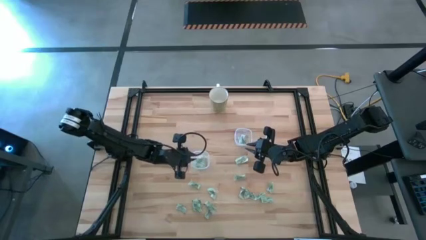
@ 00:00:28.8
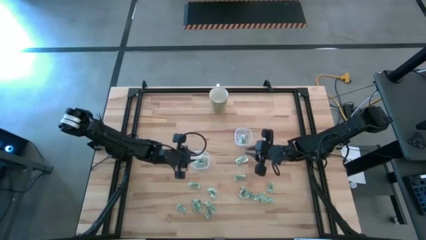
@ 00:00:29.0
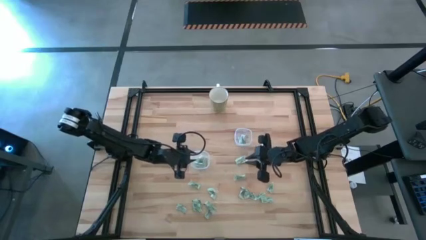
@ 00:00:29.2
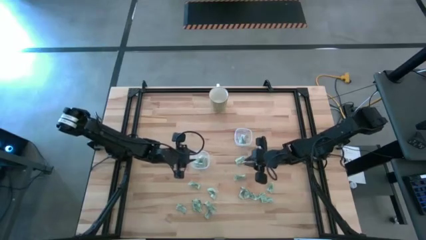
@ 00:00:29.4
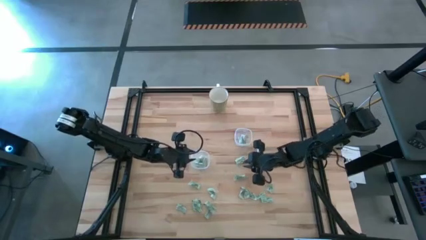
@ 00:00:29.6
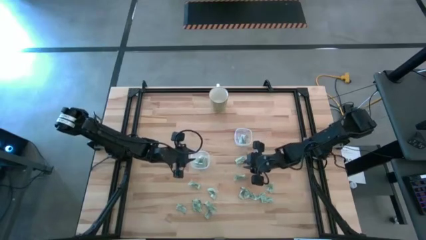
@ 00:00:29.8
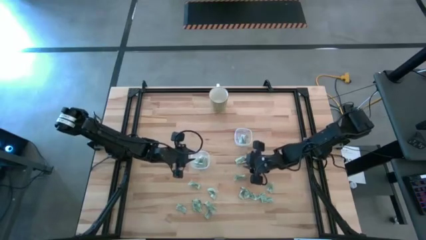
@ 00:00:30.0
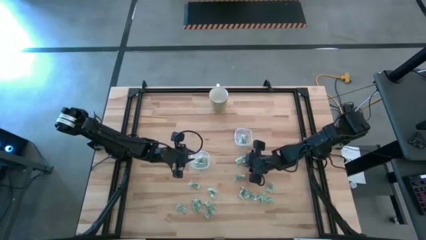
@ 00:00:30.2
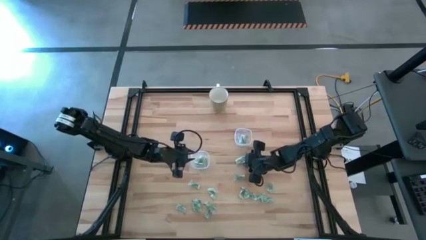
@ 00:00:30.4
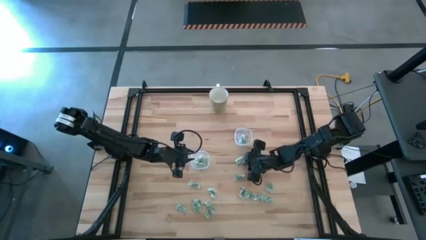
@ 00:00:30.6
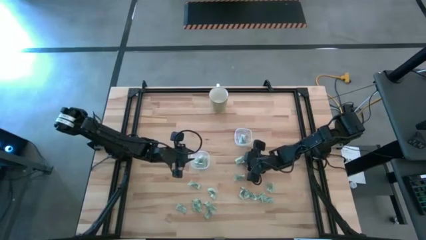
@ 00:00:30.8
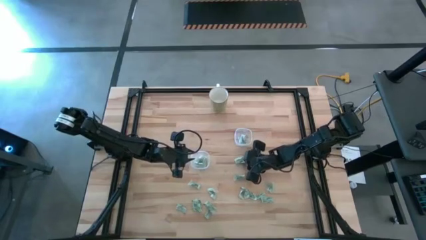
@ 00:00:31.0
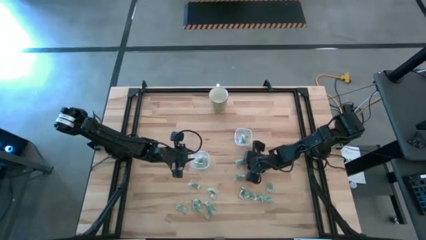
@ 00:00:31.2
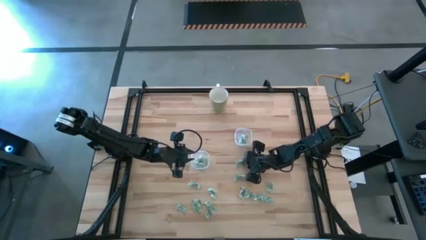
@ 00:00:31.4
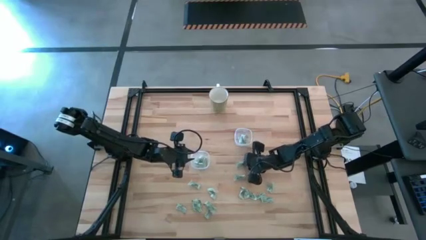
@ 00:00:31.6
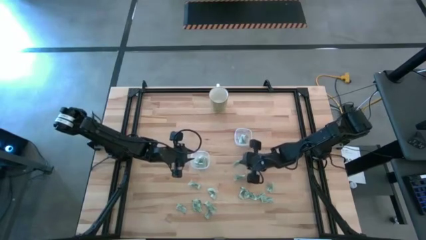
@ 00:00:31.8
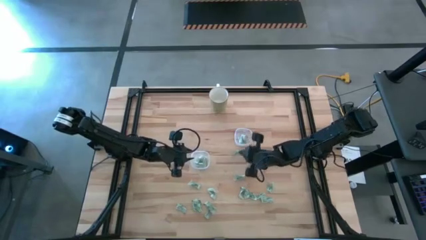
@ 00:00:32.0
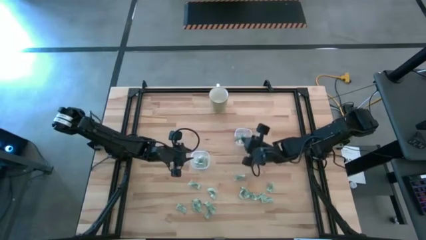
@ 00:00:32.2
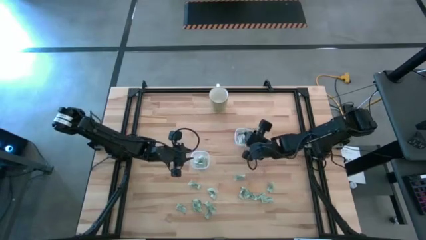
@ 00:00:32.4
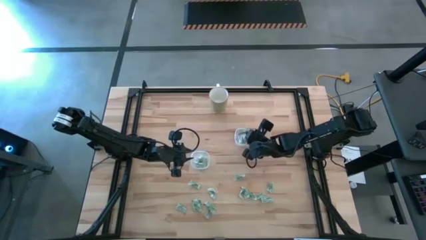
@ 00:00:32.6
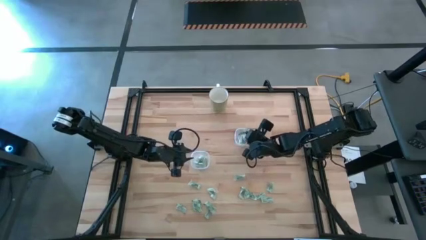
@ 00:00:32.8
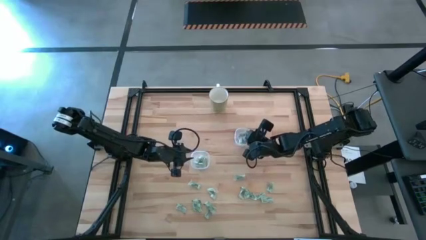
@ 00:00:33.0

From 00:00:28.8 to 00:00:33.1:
Task: Pick and place Stevia / Truvia into bins
Put the green stevia packet into the right transparent container

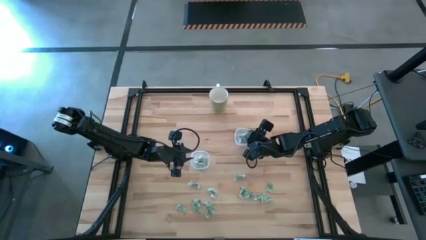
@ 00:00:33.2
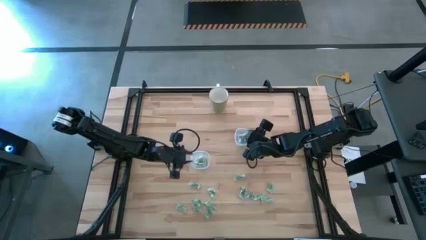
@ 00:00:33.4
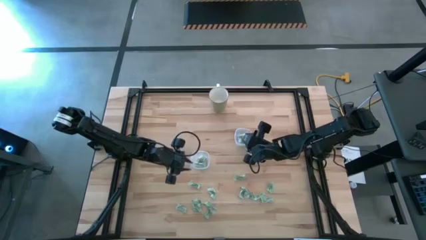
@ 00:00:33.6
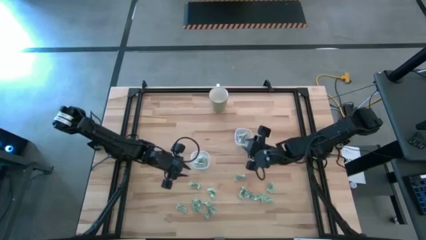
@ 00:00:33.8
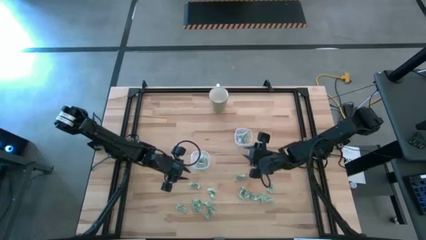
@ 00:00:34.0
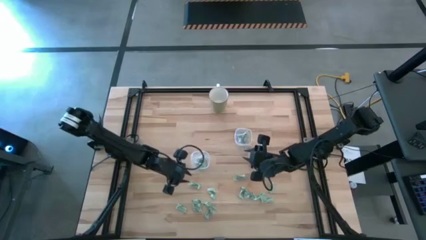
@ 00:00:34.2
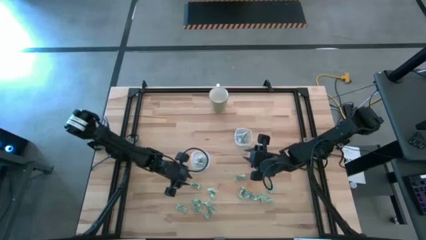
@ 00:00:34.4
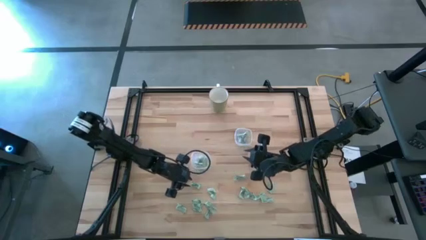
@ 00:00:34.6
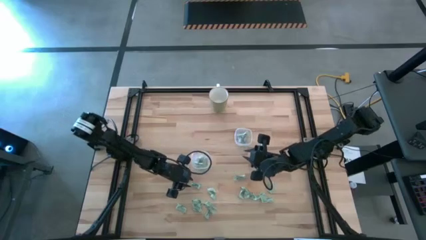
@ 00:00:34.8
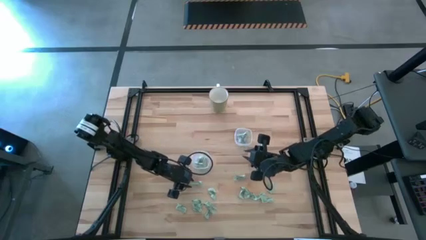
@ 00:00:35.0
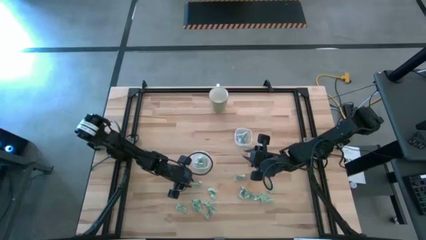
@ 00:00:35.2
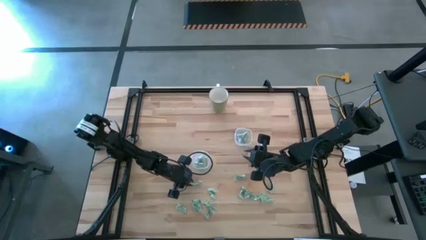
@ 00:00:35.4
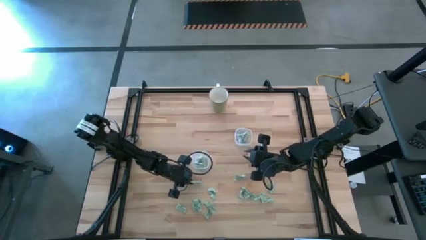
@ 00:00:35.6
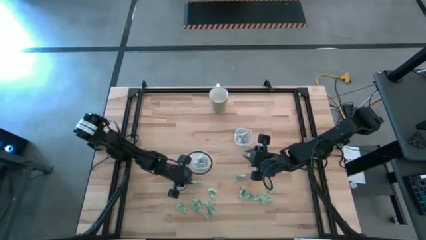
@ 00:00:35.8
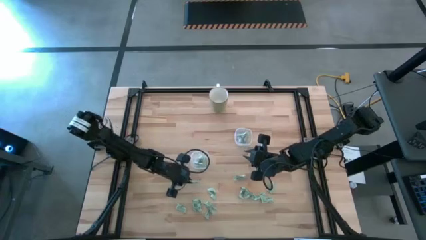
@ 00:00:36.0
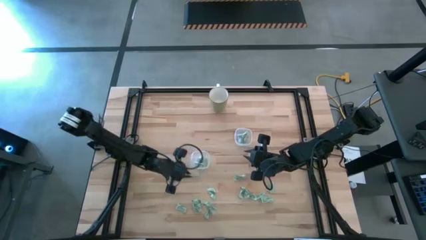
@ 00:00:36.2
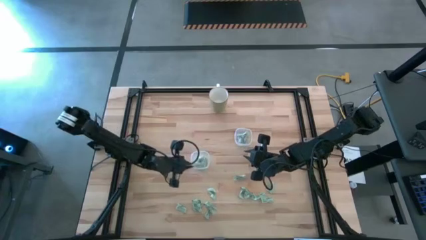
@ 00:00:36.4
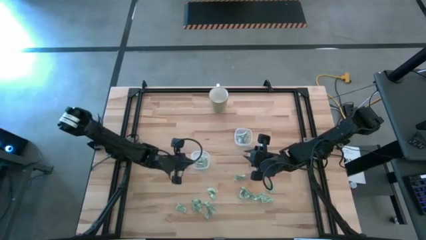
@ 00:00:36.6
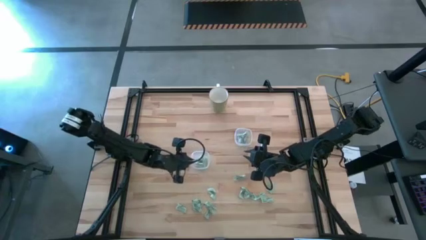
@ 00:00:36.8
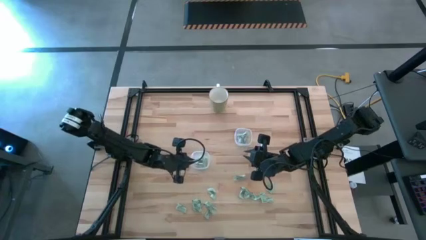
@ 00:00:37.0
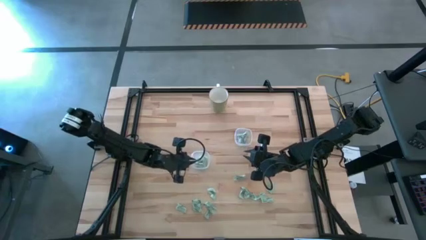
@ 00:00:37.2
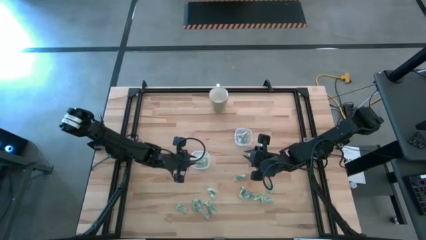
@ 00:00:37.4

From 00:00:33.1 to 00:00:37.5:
Put the green stevia packet into the left transparent container

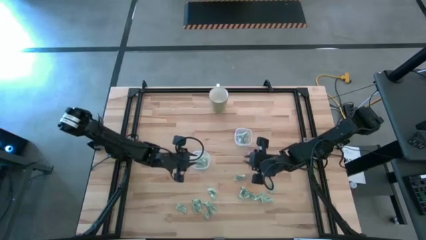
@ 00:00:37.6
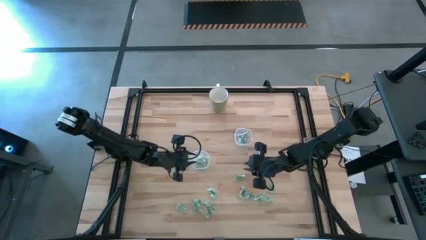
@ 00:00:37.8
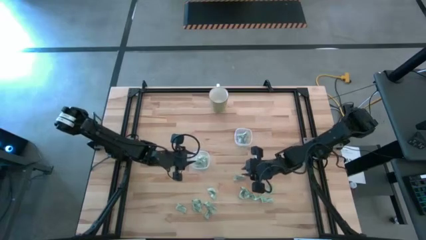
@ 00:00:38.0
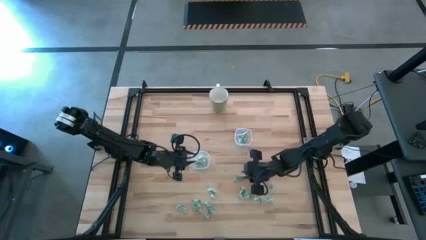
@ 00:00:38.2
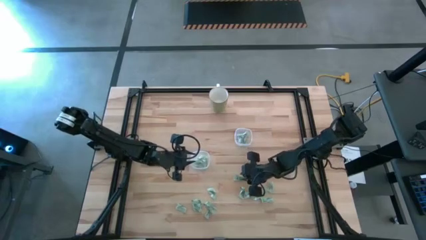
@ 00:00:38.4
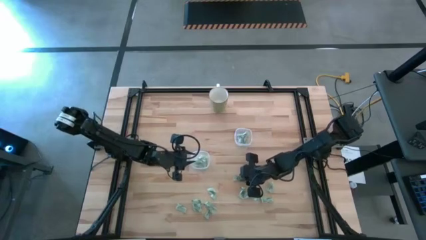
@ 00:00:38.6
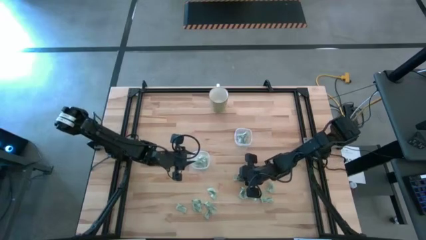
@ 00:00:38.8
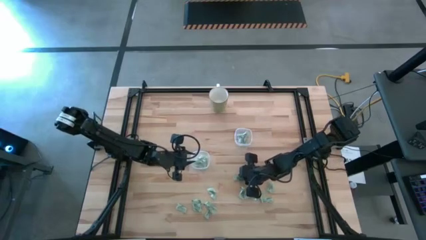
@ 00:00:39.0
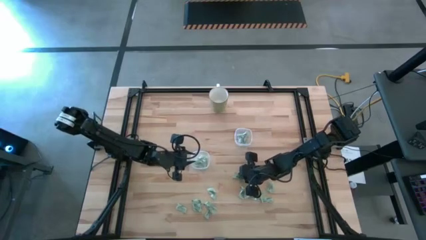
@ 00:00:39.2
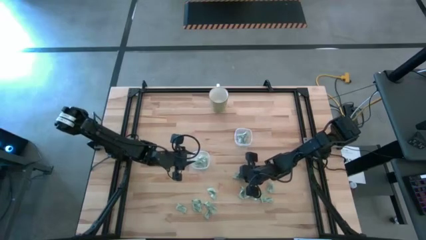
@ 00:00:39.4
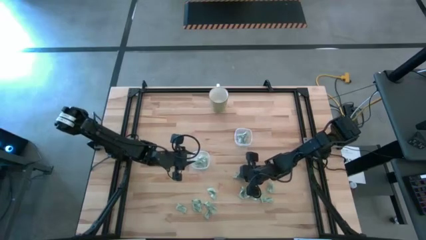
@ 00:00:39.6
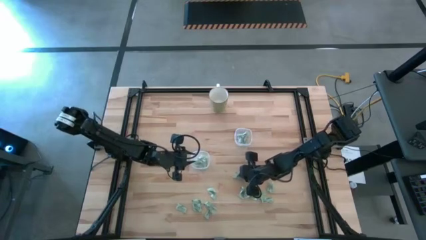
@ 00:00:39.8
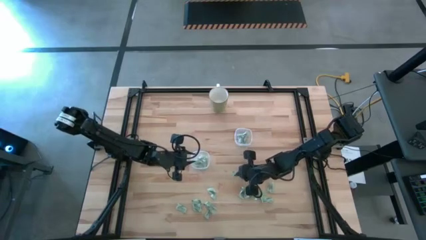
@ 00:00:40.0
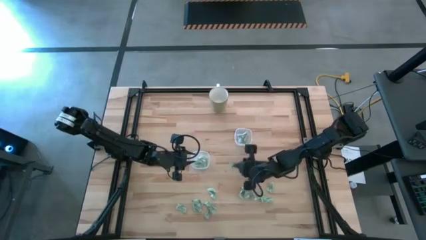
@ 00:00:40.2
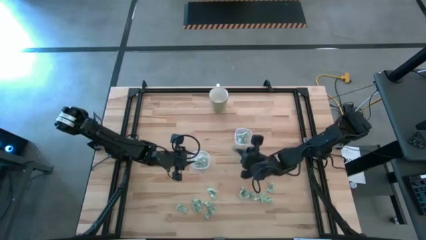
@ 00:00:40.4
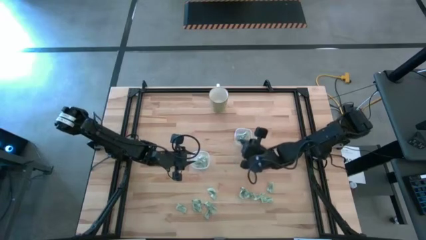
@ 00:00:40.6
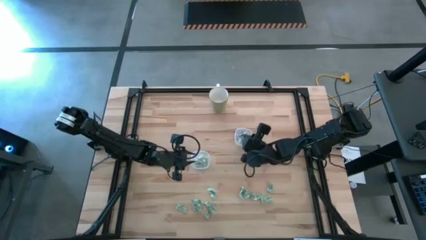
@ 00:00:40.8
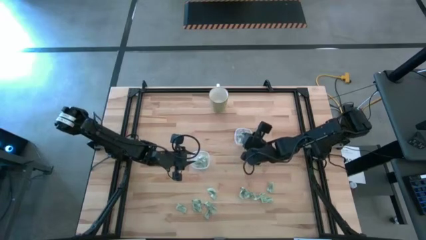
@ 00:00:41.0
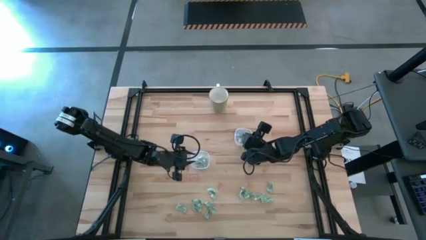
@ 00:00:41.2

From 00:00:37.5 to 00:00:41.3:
Put the green stevia packet into the right transparent container

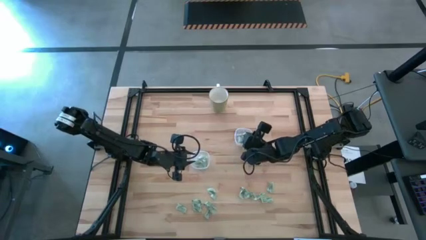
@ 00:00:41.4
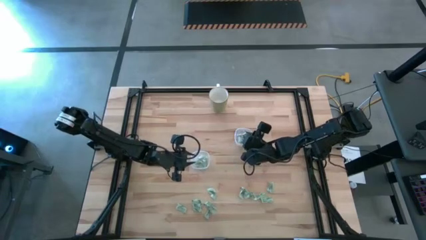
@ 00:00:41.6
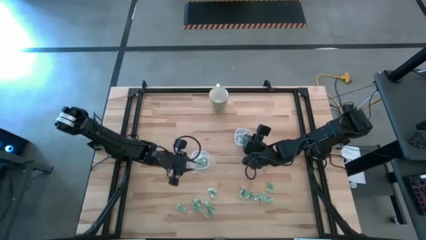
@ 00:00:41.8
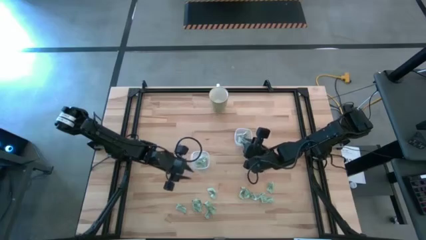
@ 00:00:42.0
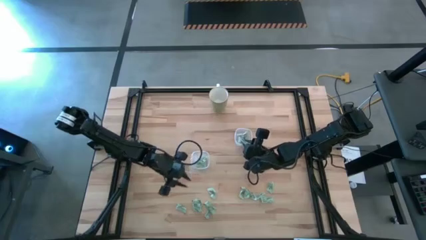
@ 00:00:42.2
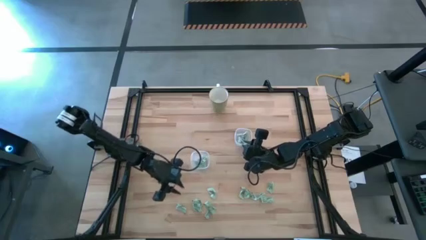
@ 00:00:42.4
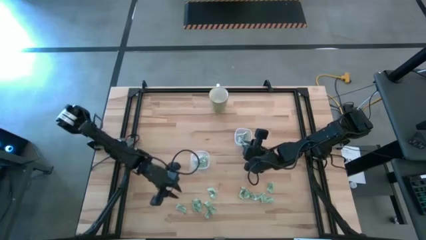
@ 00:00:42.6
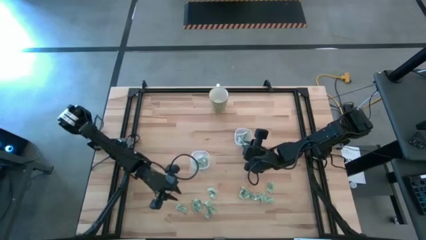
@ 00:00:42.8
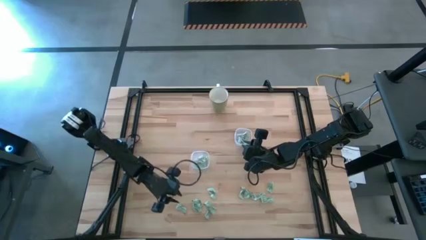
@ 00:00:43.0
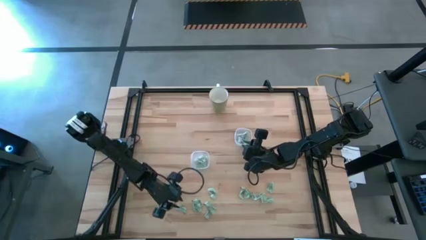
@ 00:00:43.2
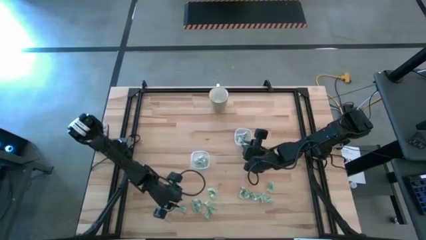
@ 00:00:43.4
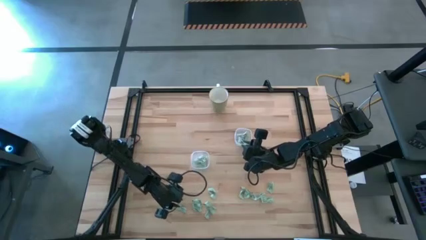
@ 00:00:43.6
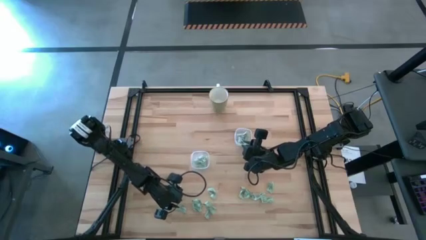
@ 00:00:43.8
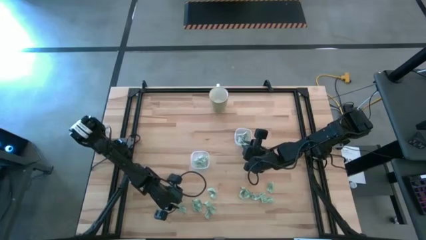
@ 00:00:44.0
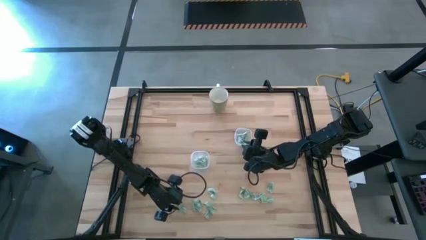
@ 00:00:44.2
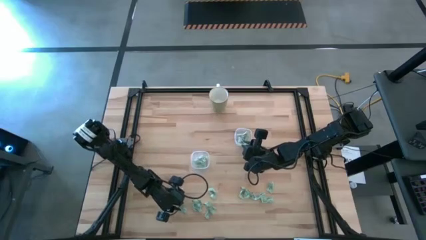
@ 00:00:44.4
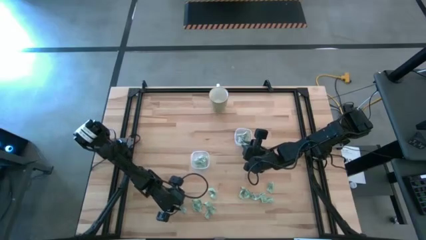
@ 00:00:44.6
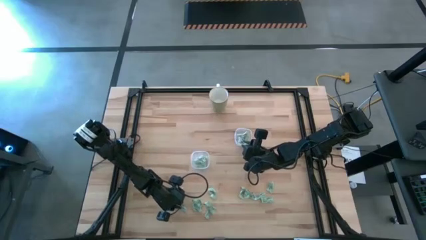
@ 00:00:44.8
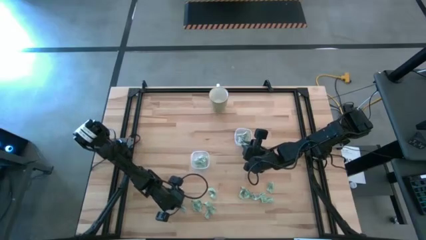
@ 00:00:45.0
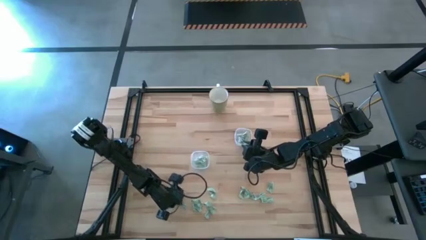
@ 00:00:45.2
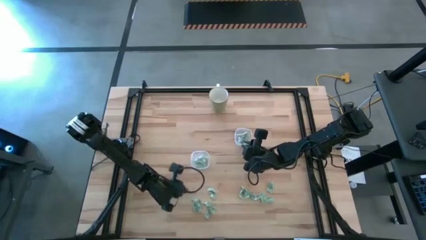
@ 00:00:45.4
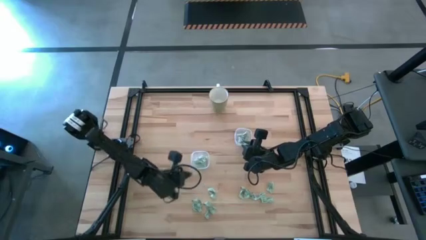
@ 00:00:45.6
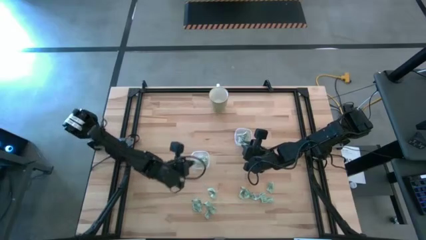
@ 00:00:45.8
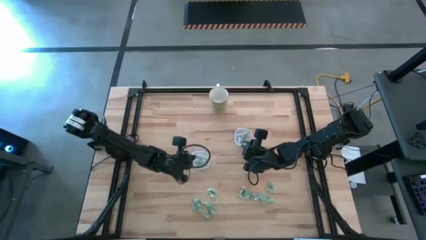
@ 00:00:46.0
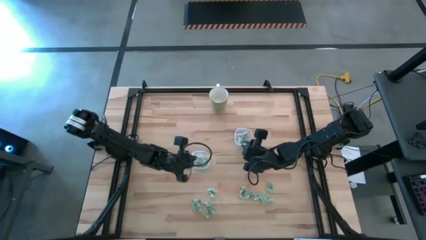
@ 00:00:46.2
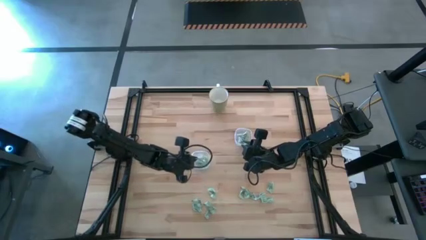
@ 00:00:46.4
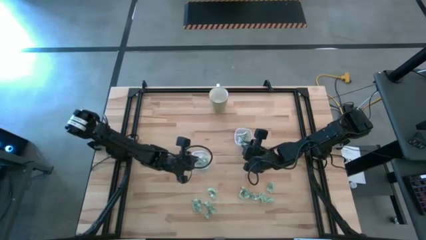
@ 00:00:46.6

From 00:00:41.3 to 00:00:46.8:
Put the green stevia packet into the left transparent container
